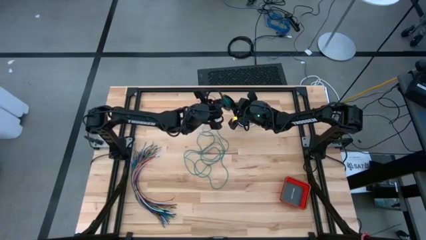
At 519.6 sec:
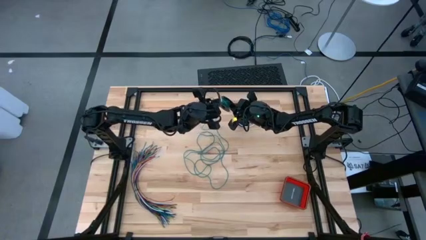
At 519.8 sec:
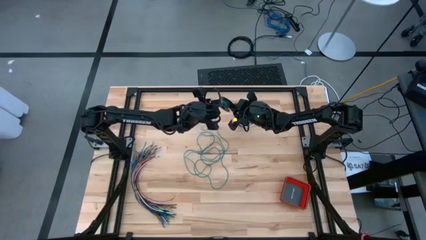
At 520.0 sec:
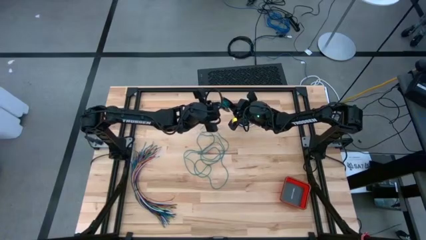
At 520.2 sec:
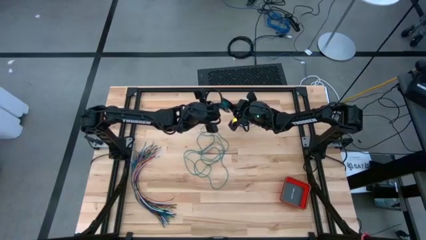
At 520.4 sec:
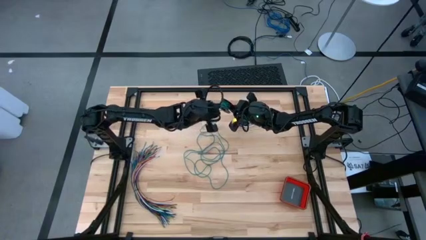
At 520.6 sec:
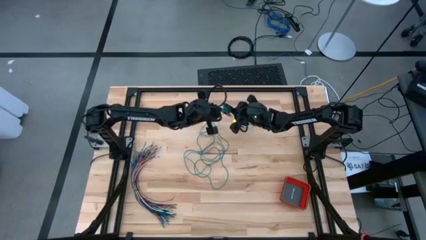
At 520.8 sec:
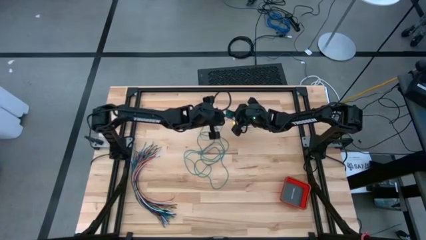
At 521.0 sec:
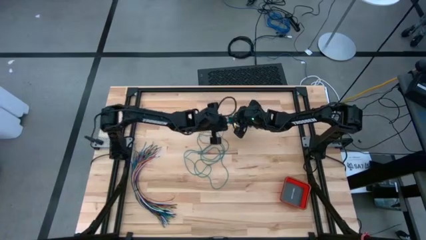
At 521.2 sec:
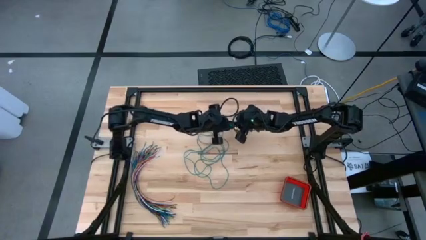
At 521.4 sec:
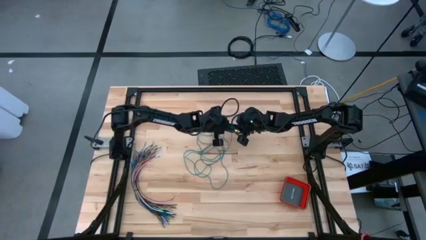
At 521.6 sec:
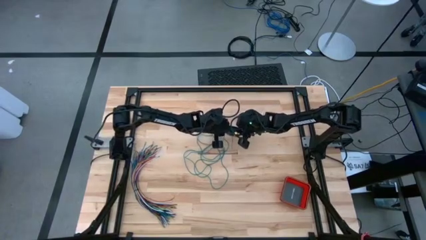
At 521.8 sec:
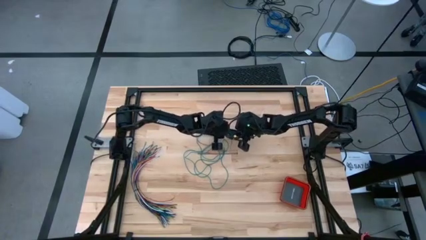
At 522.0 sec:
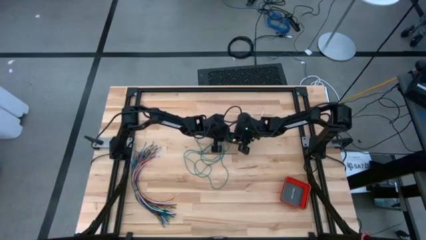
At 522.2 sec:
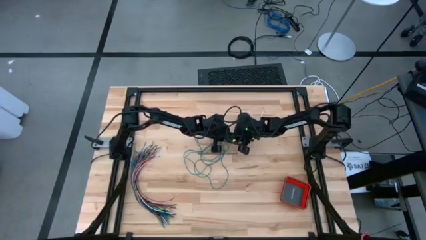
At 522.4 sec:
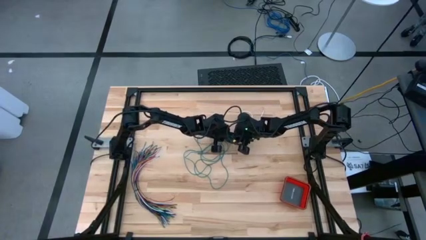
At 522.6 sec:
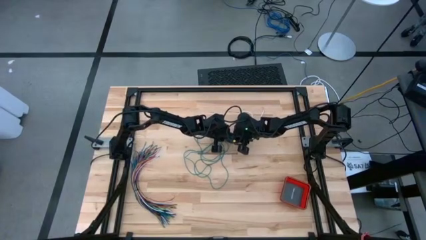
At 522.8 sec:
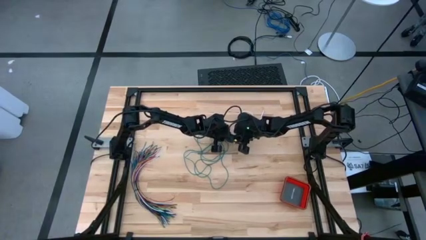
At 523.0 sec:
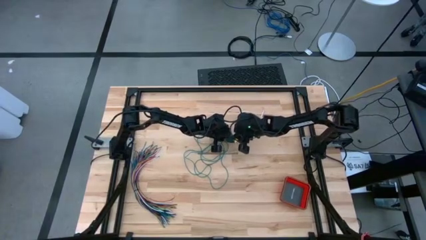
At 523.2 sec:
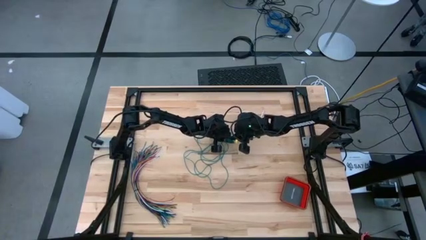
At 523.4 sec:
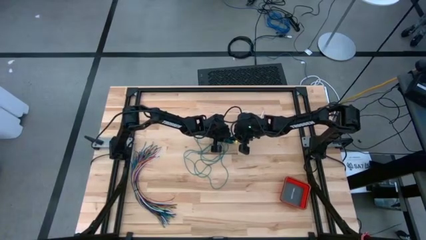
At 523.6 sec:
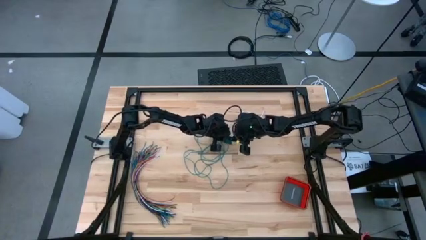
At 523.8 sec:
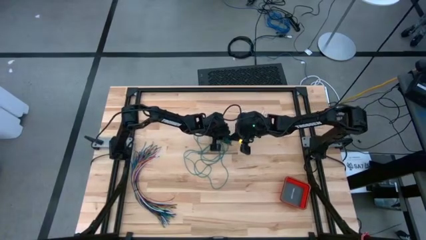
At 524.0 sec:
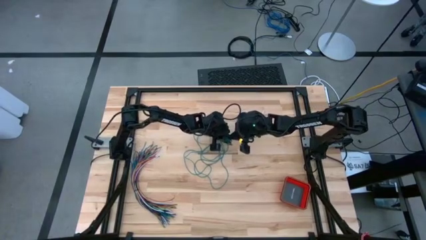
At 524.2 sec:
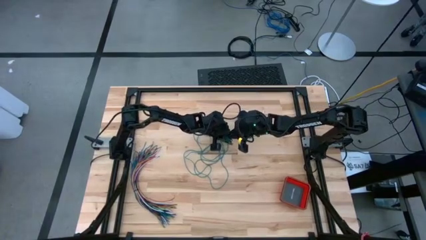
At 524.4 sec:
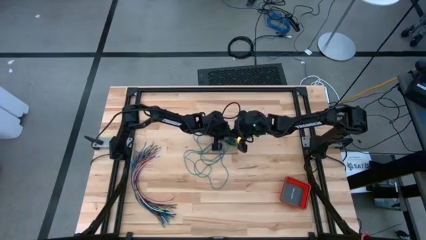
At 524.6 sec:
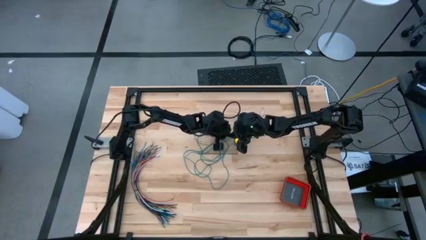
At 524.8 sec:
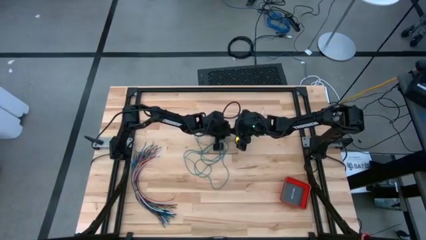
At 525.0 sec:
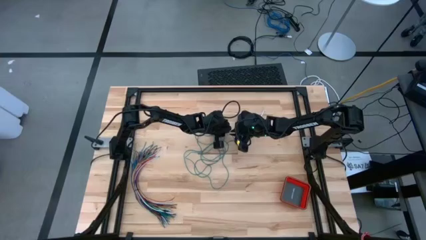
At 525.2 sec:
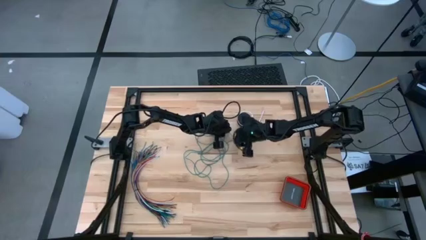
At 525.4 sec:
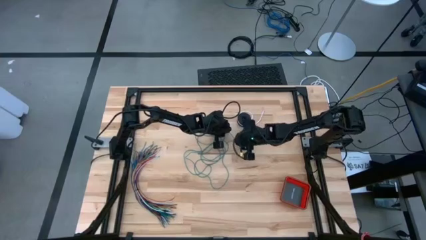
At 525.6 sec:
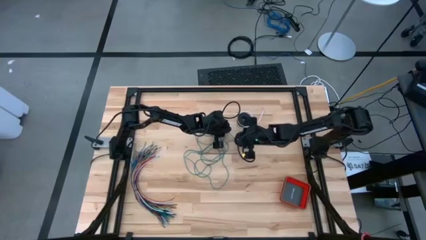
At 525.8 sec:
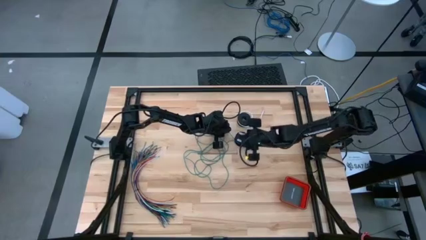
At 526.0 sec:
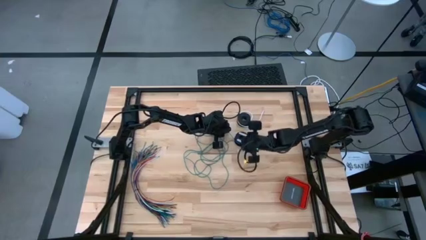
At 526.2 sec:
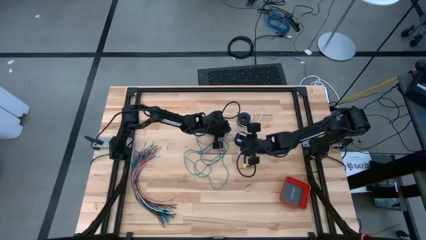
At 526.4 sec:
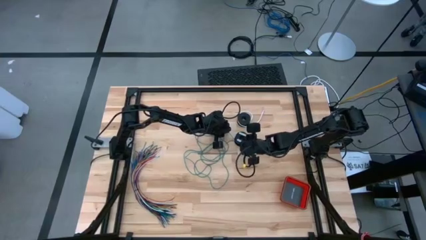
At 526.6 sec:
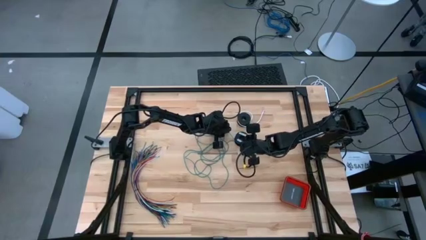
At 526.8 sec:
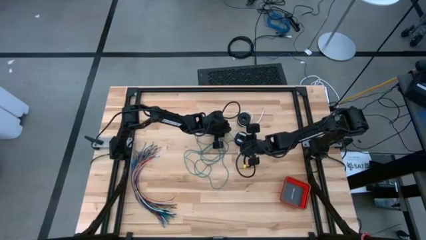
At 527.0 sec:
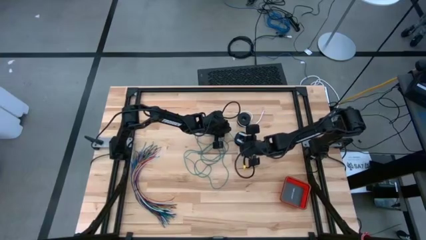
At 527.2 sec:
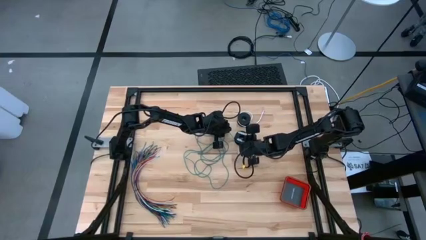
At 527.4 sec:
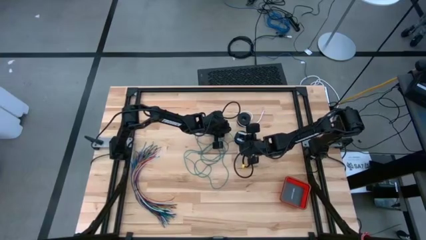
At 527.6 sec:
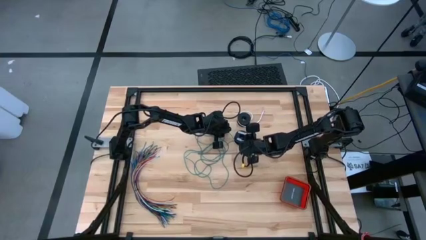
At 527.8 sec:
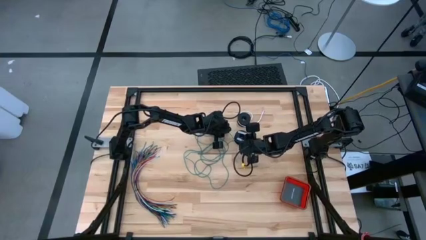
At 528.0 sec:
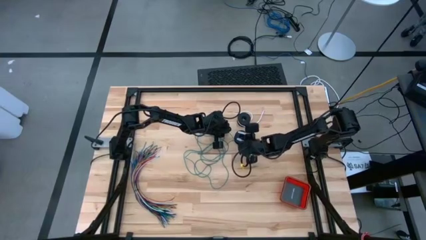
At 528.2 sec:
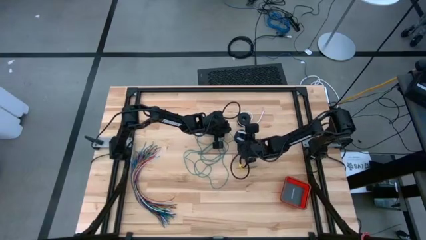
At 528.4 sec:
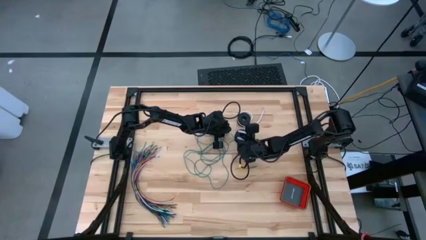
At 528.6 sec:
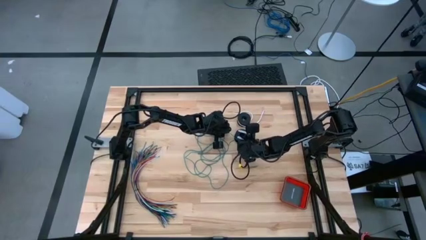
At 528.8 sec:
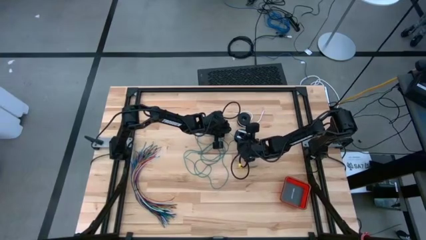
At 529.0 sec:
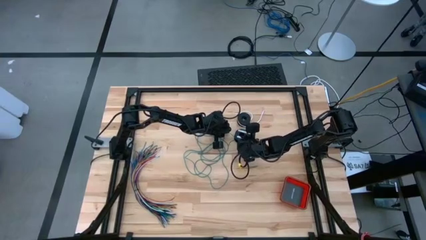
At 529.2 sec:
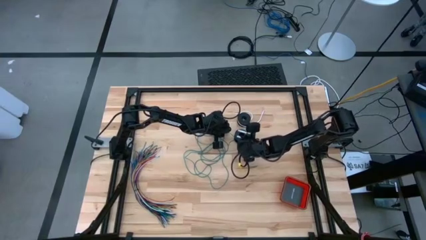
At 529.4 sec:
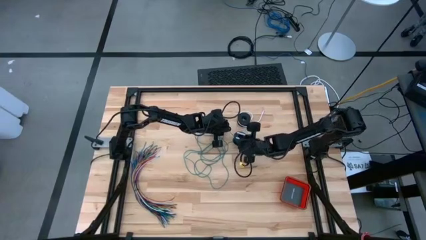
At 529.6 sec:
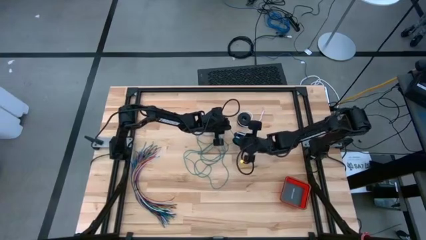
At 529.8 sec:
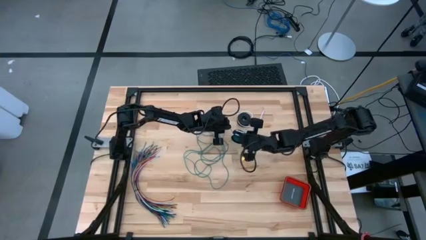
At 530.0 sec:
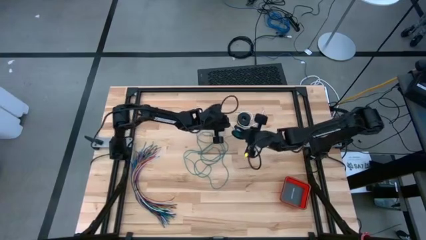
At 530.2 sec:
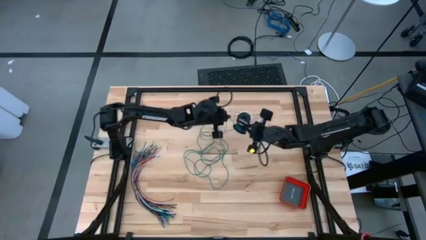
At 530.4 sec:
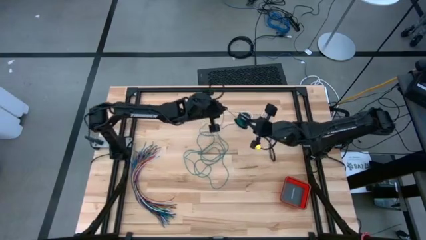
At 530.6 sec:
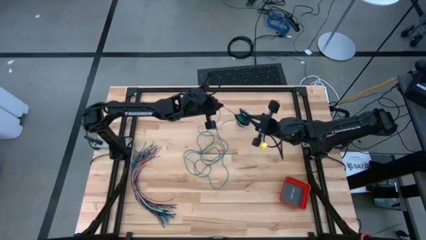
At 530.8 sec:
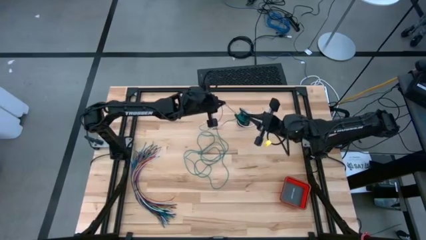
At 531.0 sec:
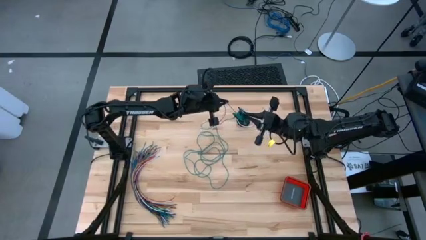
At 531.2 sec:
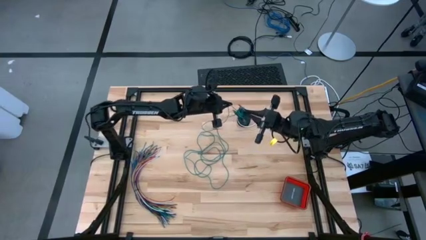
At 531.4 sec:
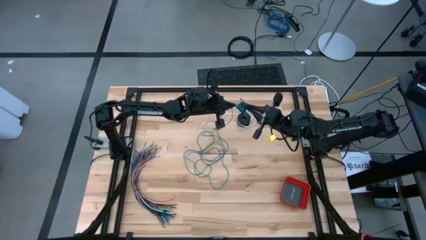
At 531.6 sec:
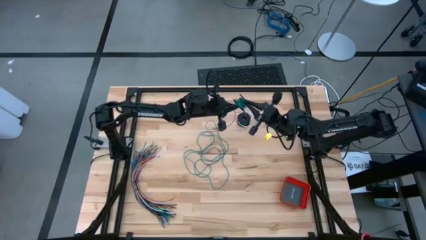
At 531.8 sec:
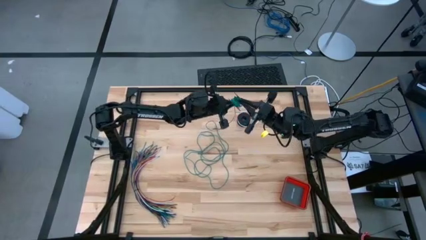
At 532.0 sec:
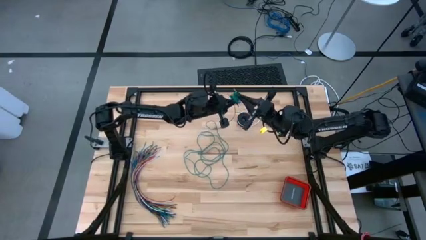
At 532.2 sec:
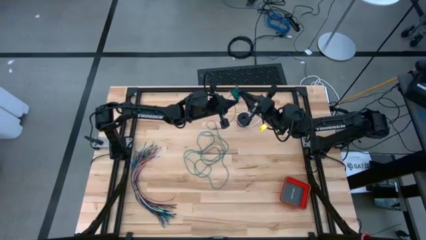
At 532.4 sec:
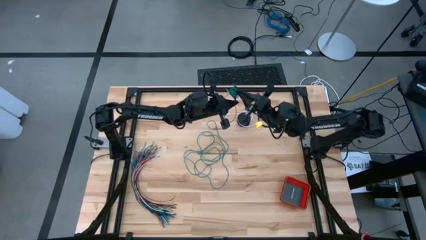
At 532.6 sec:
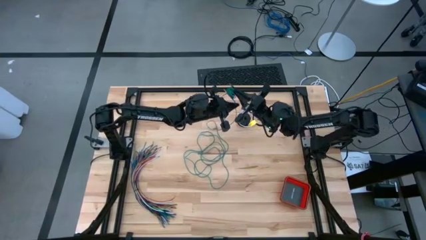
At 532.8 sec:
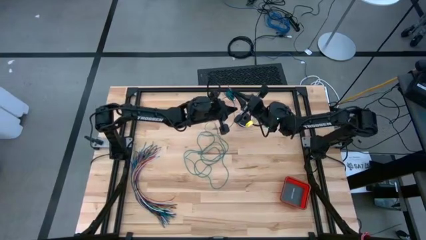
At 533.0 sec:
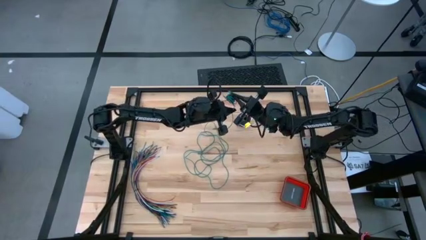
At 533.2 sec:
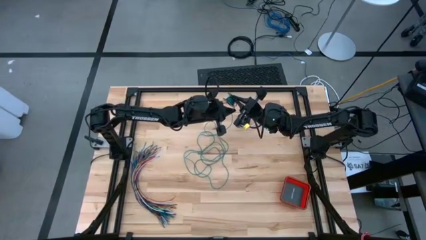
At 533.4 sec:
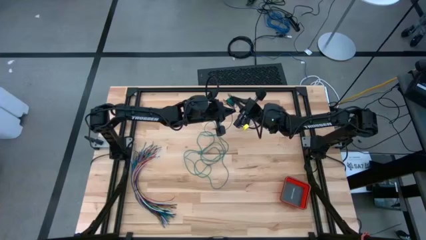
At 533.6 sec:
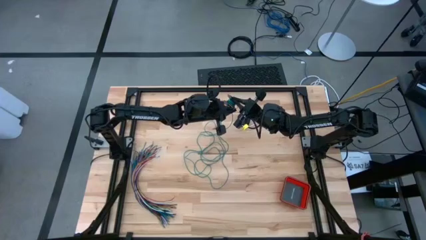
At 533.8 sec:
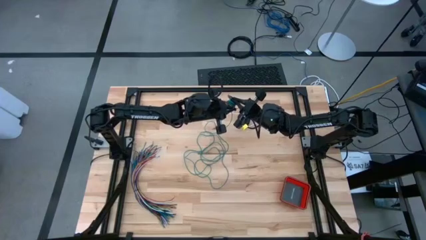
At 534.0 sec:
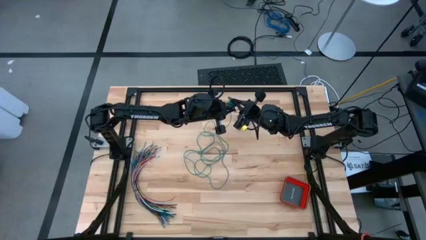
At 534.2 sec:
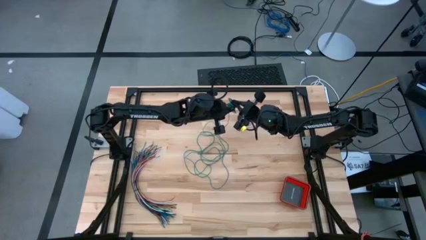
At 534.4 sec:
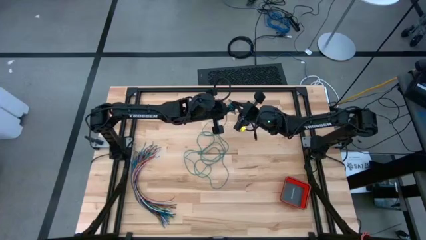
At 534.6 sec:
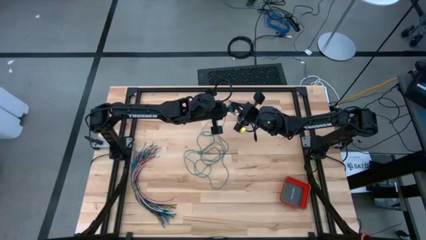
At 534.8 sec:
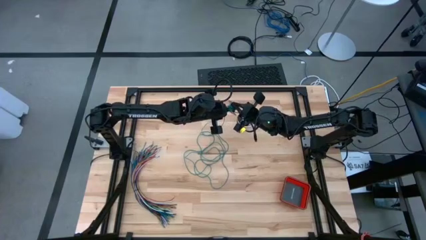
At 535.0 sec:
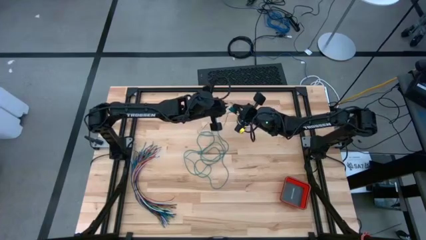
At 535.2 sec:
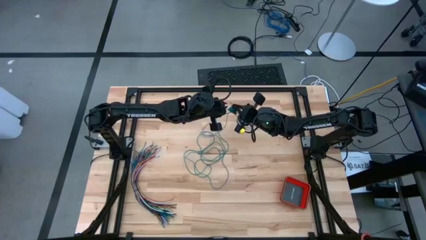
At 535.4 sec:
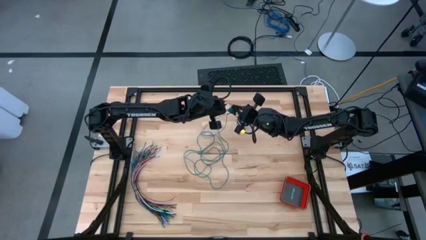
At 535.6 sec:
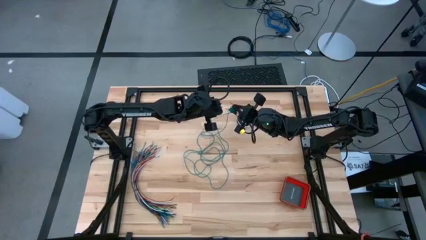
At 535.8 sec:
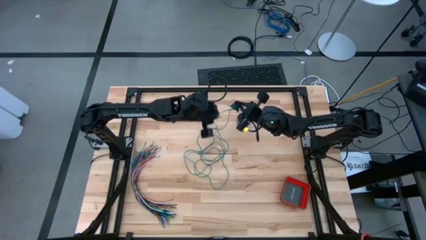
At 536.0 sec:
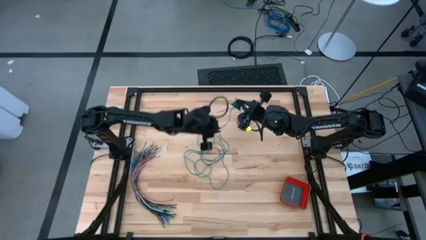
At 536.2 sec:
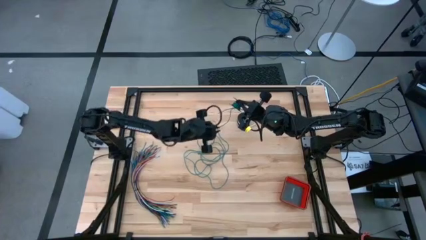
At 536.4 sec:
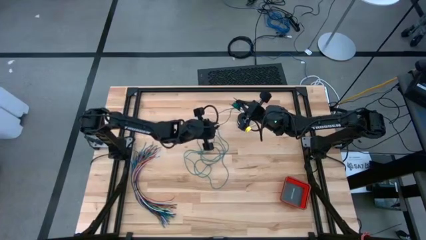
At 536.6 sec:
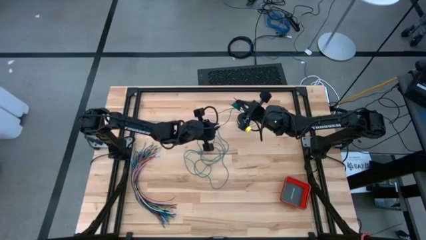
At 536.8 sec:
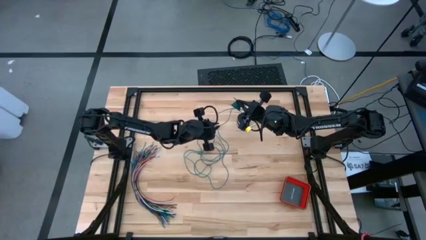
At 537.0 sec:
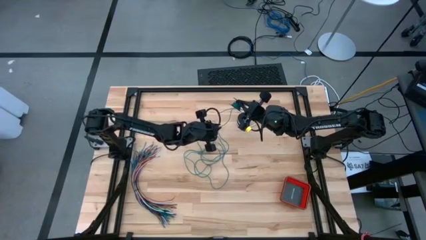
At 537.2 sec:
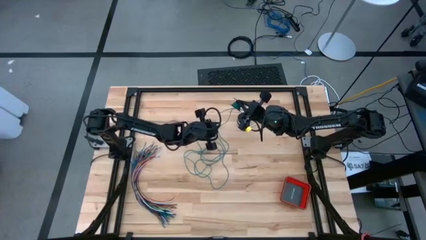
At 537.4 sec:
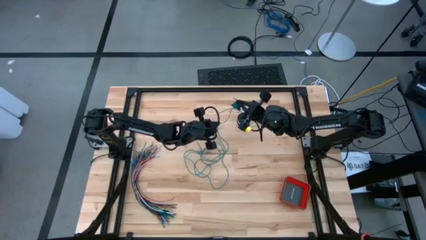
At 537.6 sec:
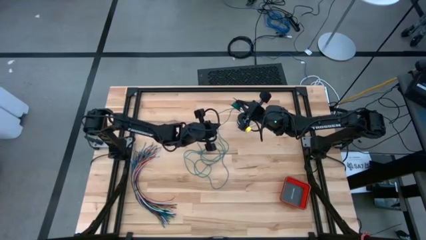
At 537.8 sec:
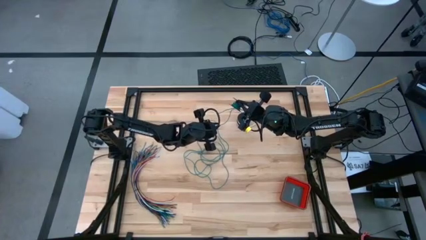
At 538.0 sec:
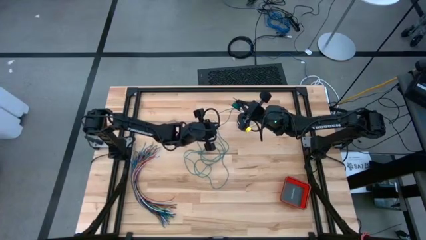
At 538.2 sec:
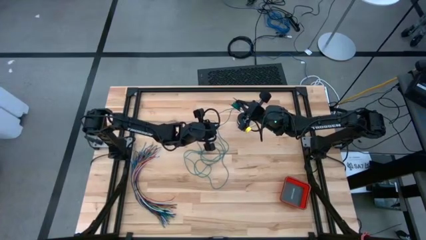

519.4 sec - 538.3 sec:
Task: Coil cords
Coil the green wire onto the spool
